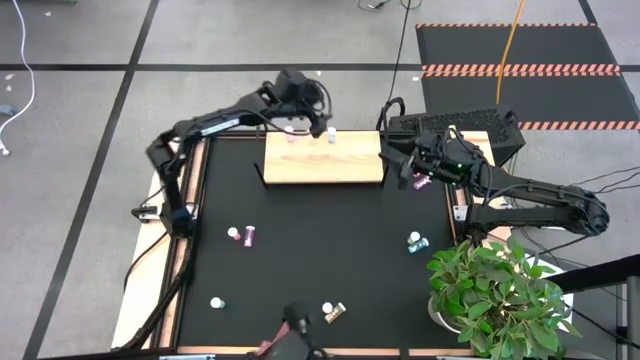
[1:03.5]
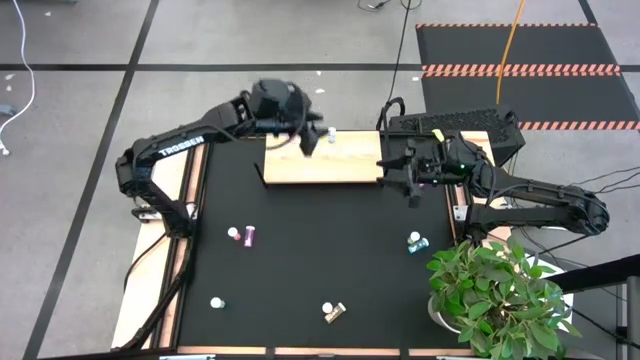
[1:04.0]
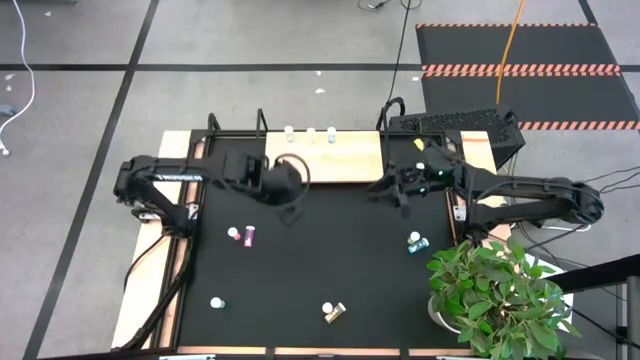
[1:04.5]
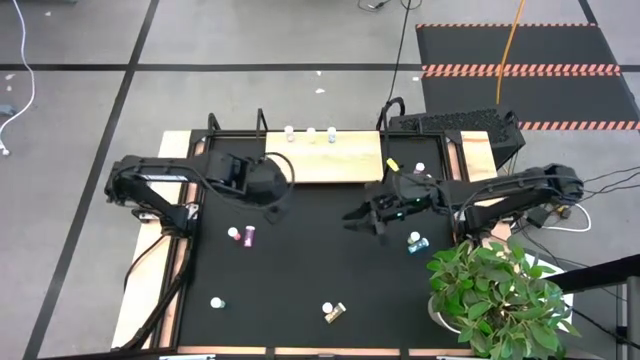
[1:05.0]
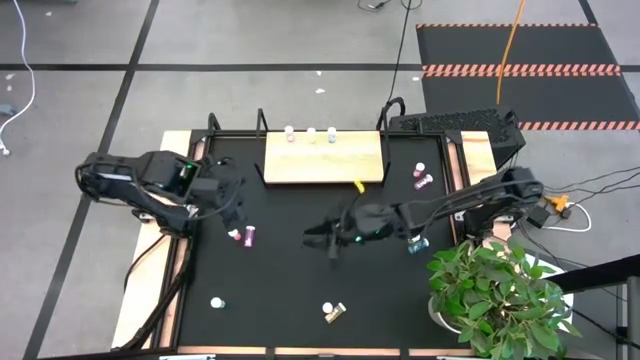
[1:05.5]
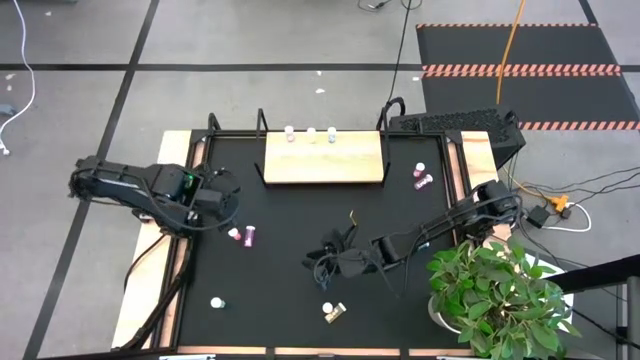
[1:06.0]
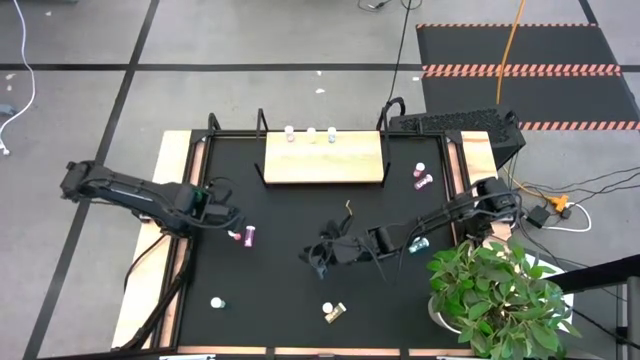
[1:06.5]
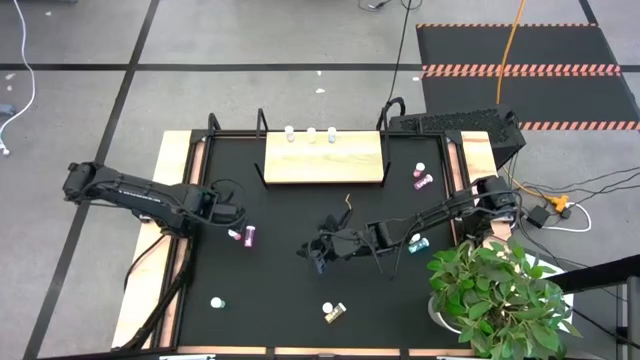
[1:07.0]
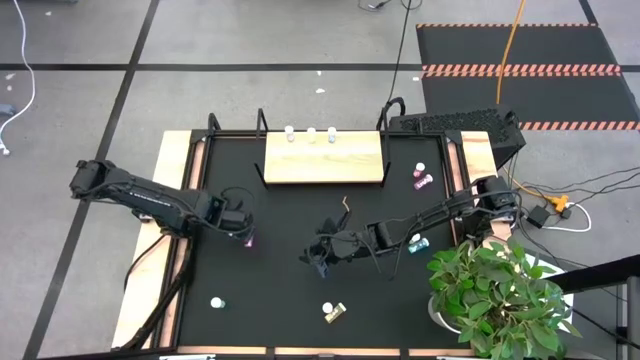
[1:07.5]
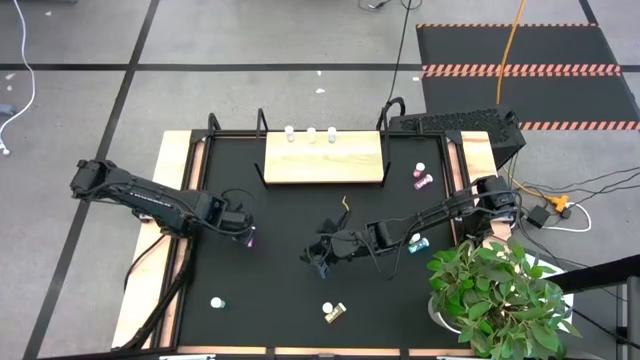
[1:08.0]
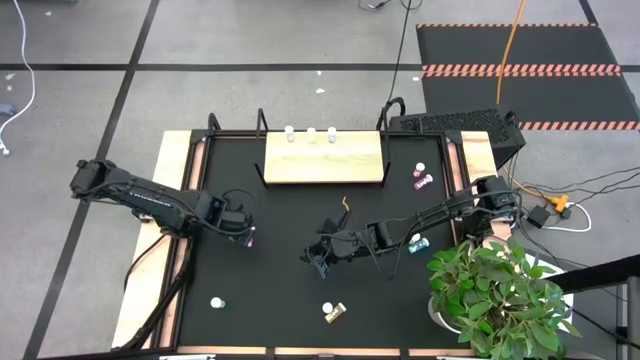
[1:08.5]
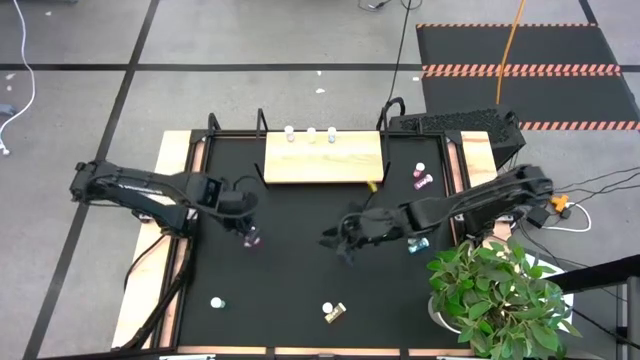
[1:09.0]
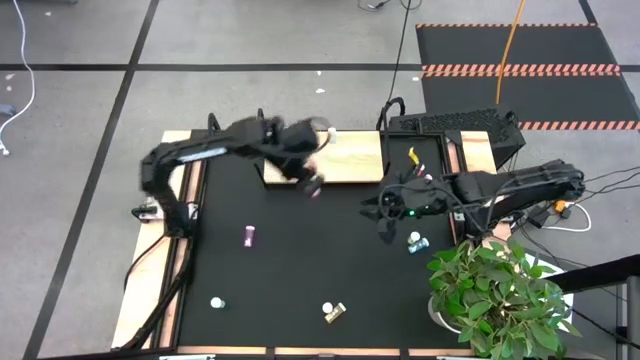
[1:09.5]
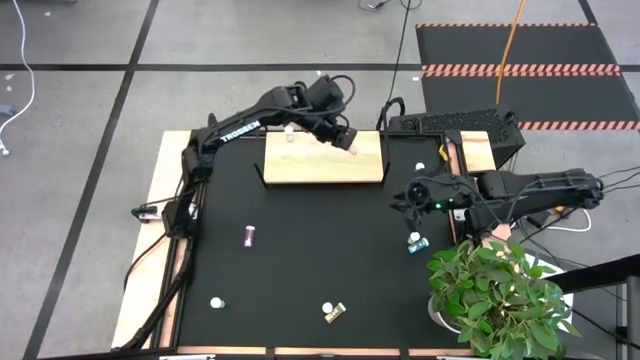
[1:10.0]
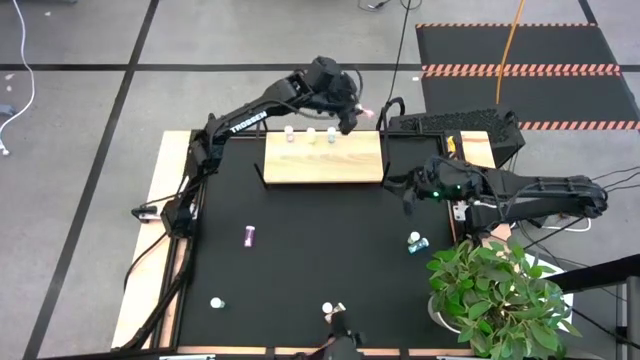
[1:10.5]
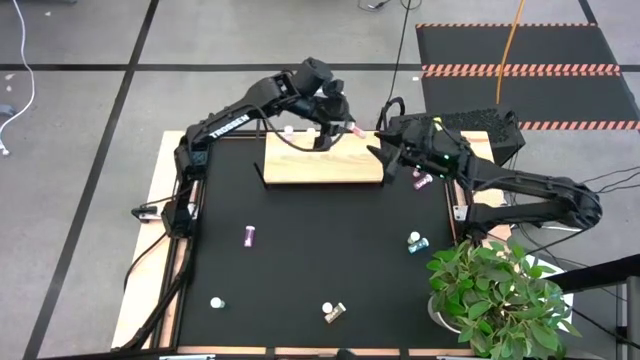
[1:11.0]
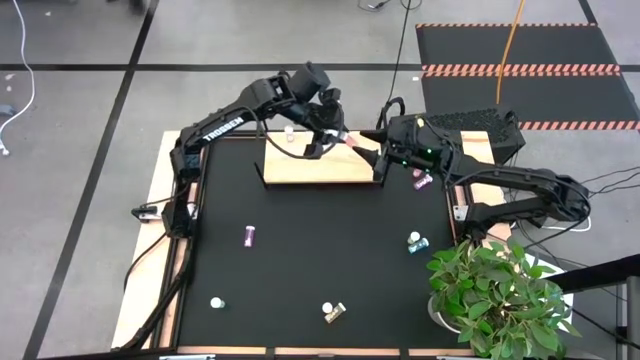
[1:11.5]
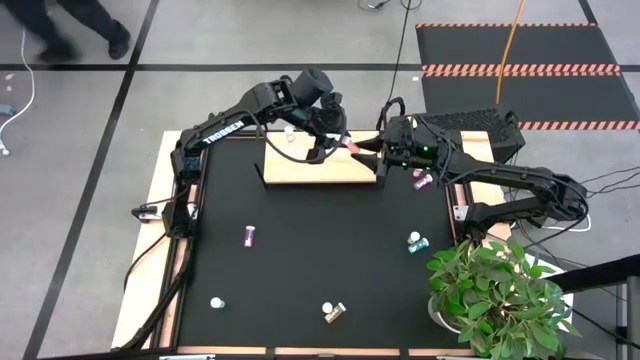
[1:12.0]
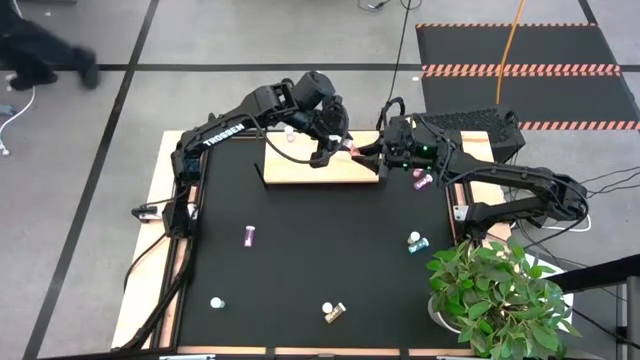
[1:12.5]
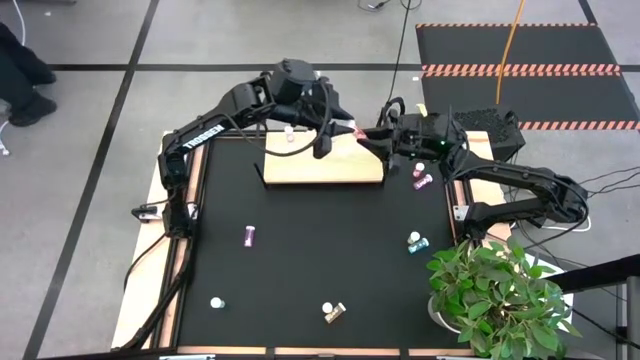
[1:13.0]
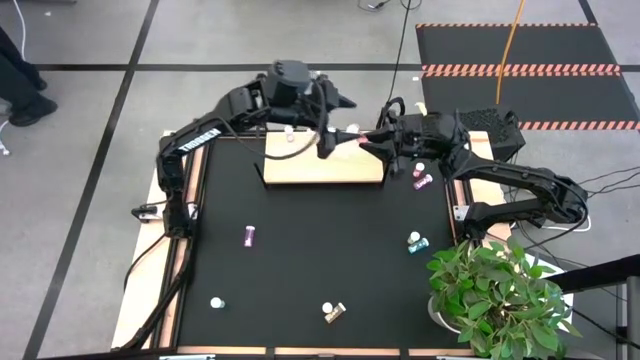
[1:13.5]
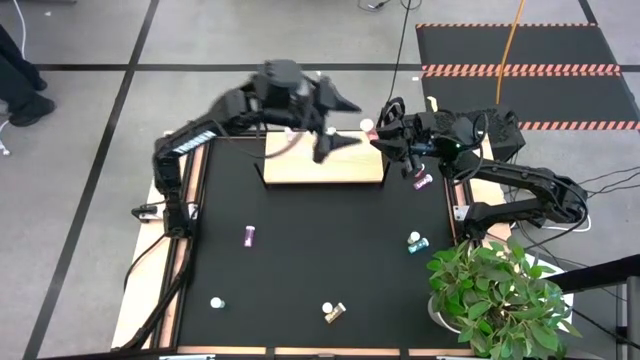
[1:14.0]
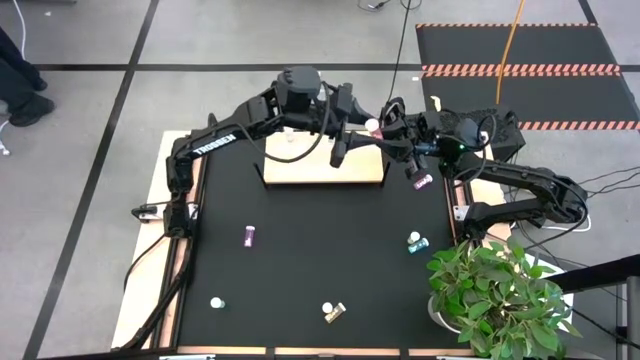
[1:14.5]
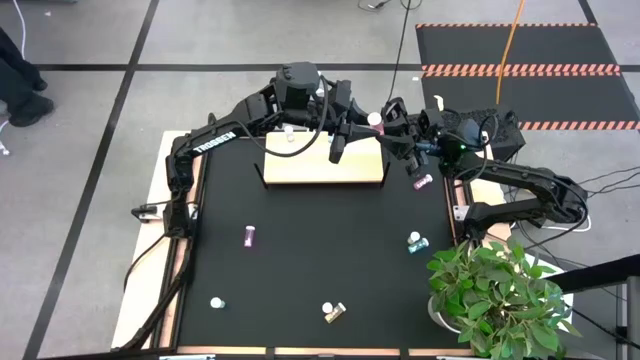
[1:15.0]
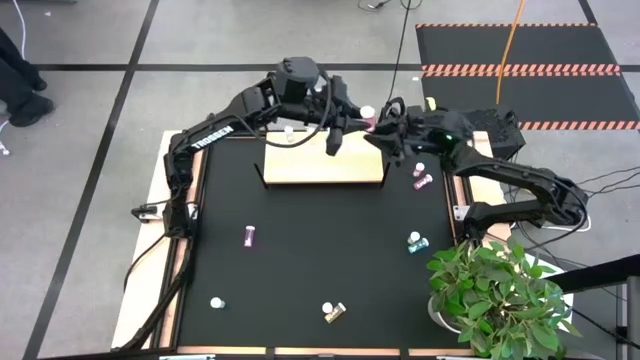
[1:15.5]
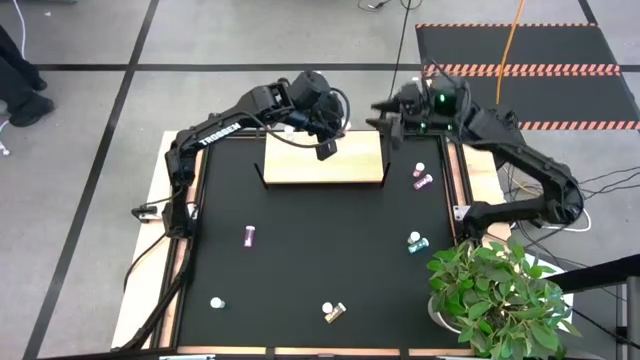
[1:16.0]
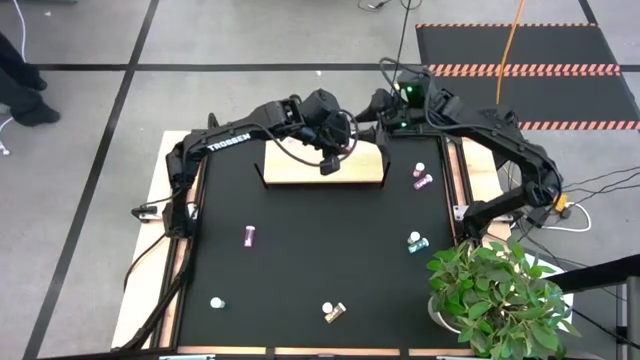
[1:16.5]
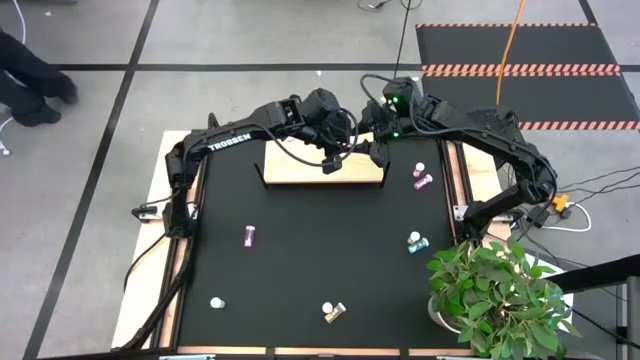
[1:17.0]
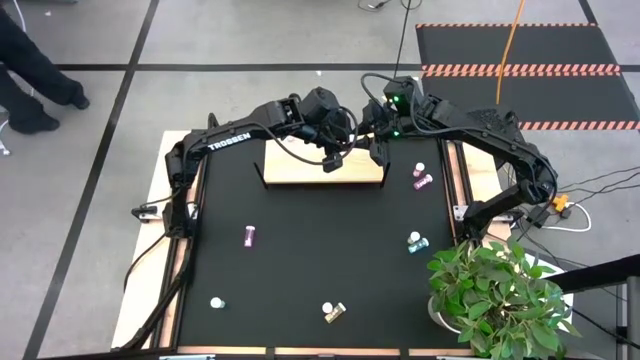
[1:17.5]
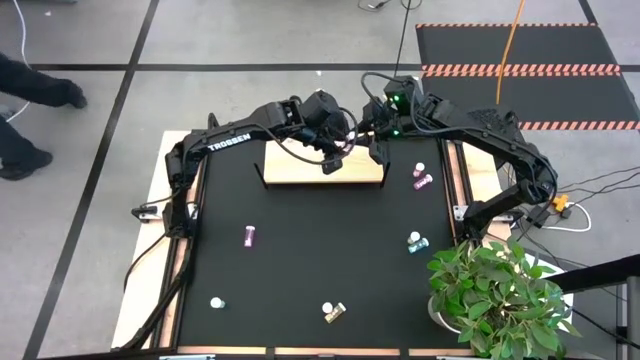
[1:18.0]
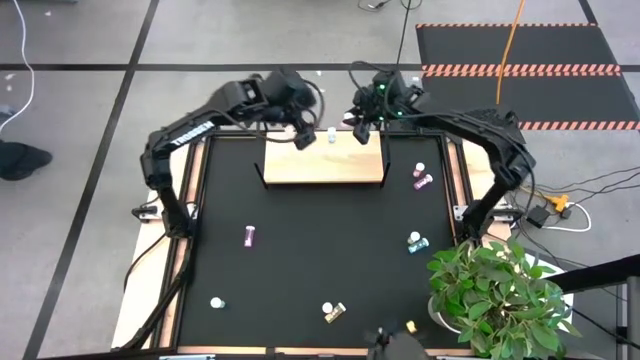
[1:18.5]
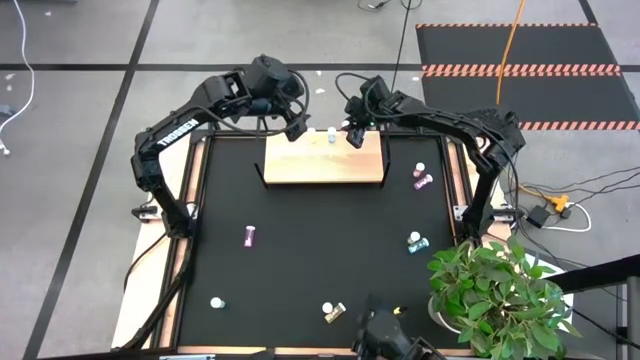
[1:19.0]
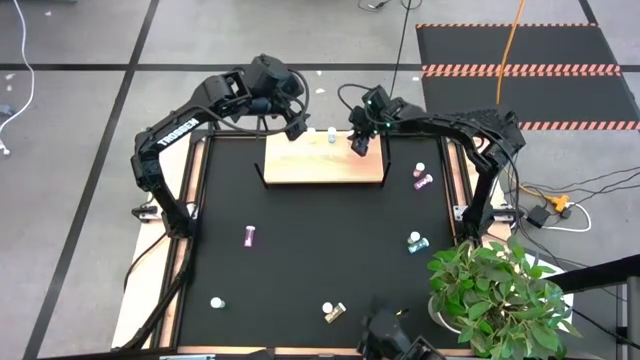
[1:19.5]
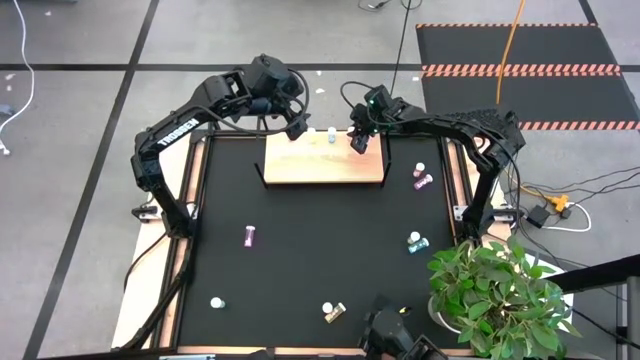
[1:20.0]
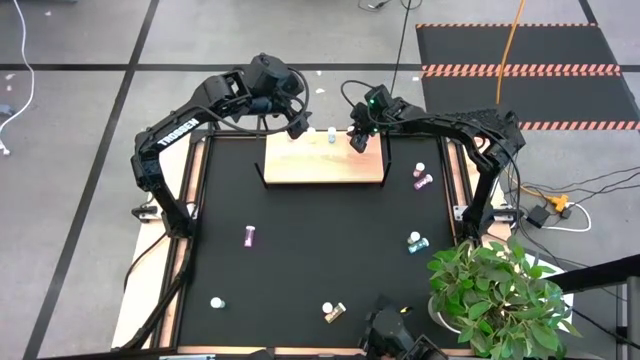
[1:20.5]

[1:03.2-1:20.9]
Task: Pick and place medicine bottles onto shelf by color
Put the left orange pill bottle on the shelf
